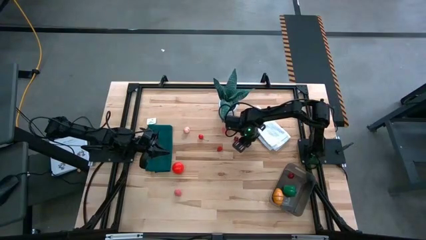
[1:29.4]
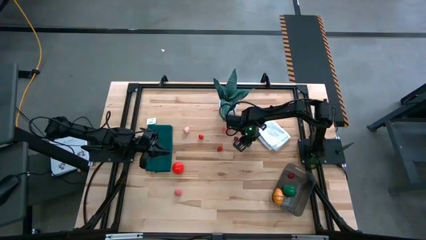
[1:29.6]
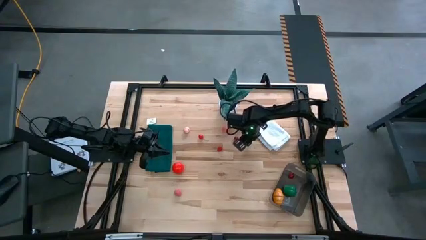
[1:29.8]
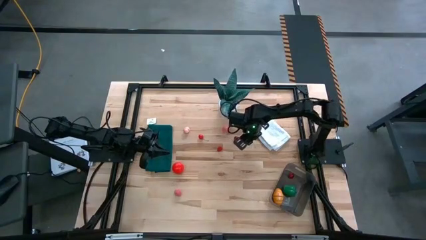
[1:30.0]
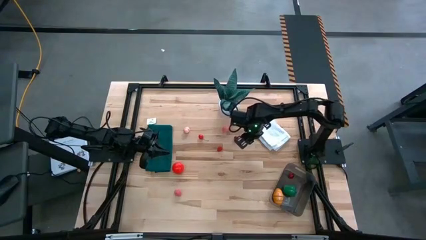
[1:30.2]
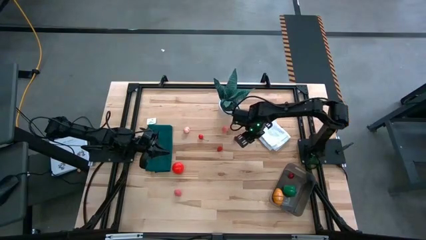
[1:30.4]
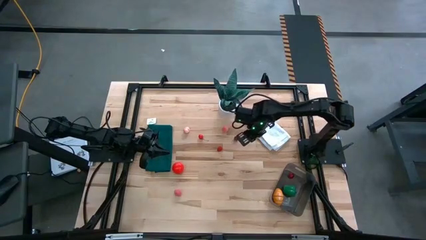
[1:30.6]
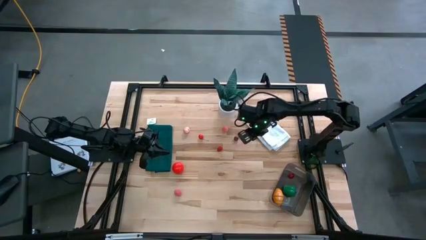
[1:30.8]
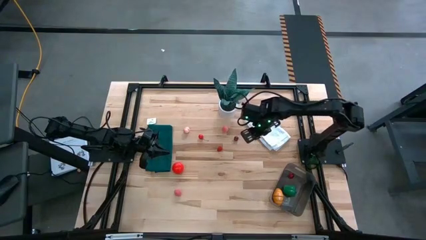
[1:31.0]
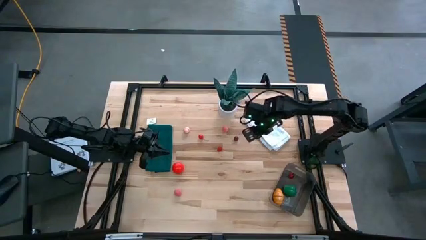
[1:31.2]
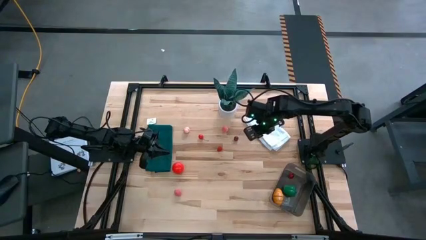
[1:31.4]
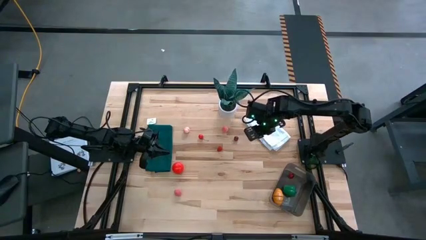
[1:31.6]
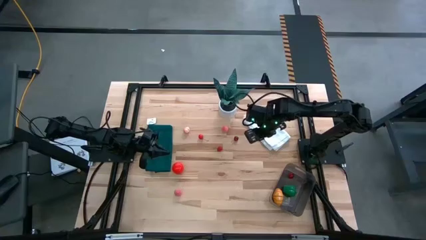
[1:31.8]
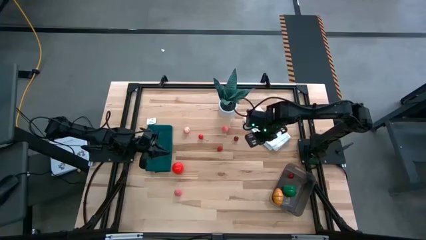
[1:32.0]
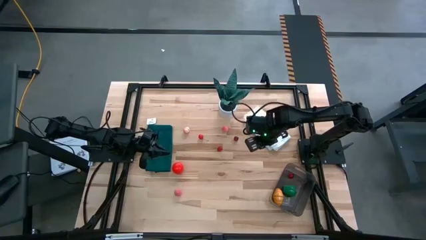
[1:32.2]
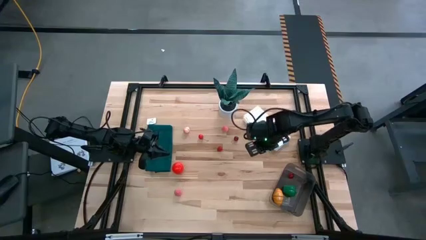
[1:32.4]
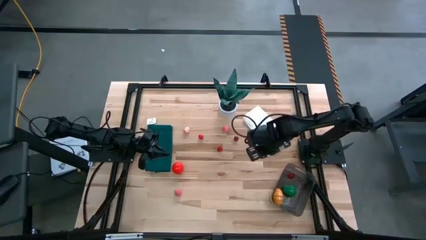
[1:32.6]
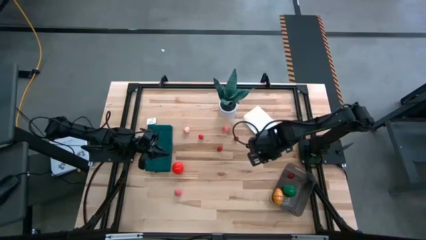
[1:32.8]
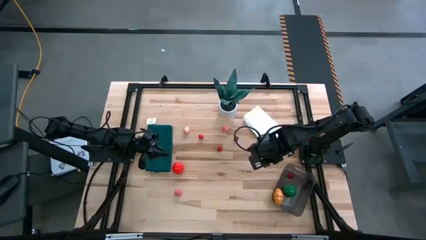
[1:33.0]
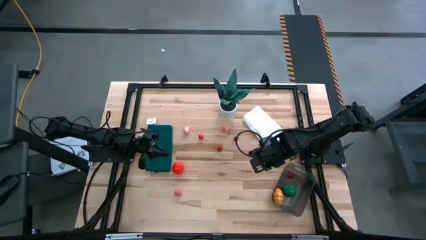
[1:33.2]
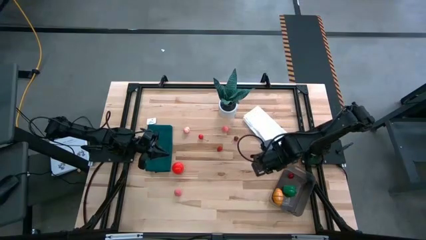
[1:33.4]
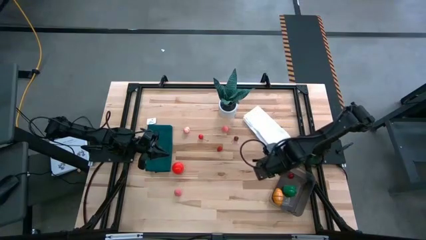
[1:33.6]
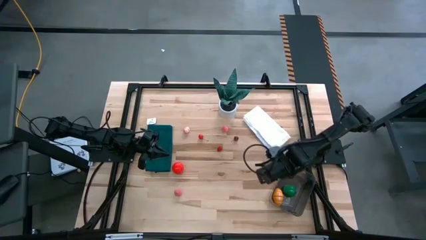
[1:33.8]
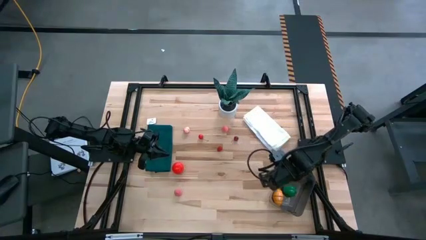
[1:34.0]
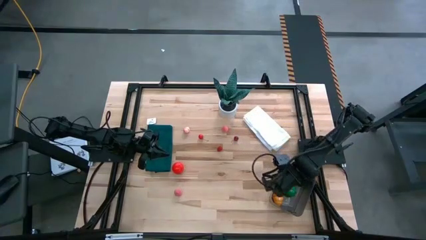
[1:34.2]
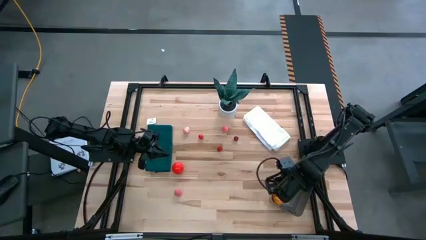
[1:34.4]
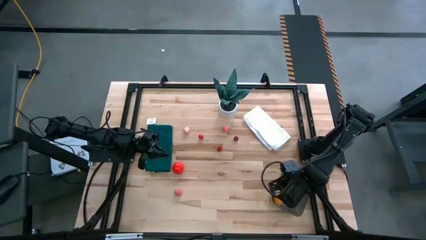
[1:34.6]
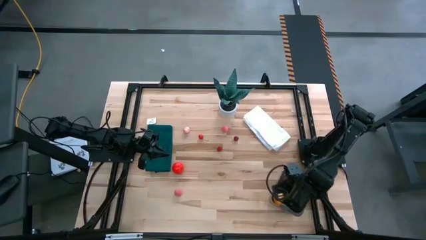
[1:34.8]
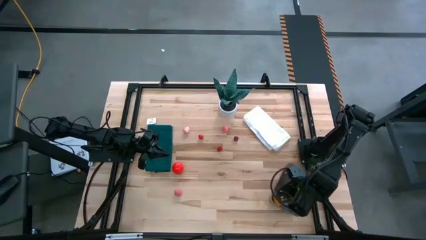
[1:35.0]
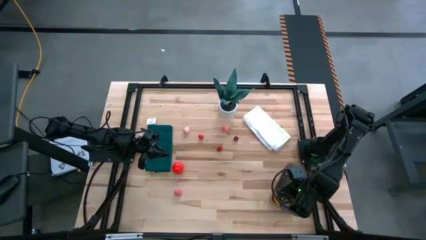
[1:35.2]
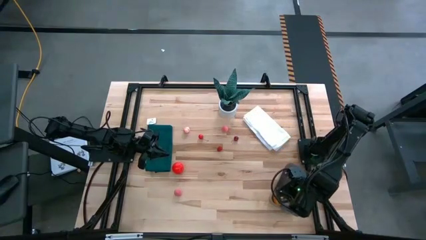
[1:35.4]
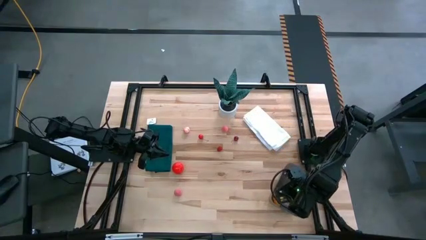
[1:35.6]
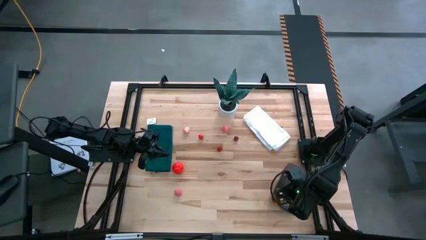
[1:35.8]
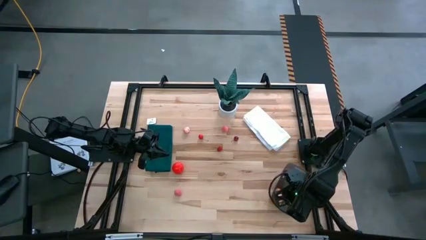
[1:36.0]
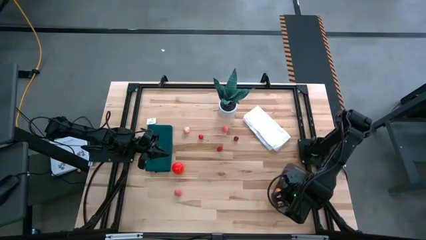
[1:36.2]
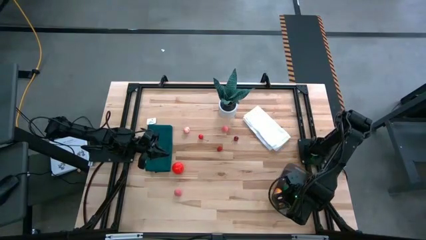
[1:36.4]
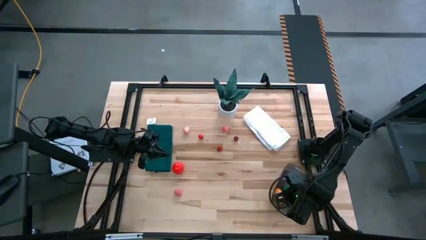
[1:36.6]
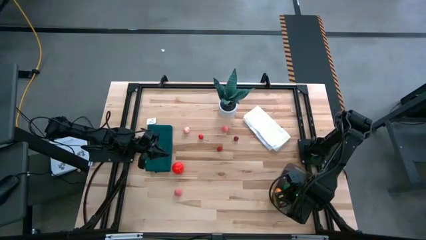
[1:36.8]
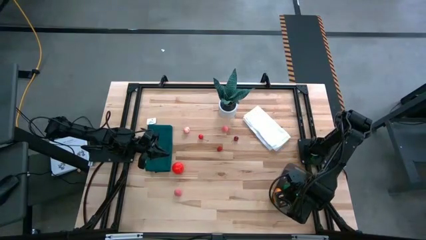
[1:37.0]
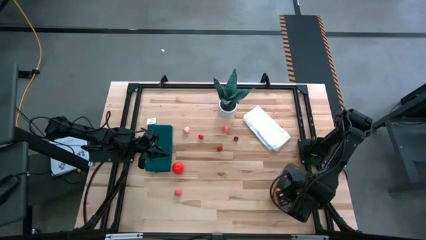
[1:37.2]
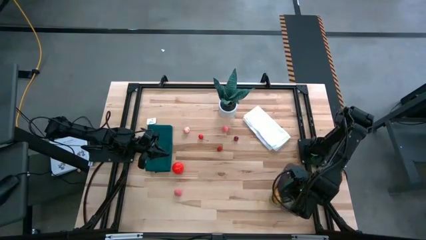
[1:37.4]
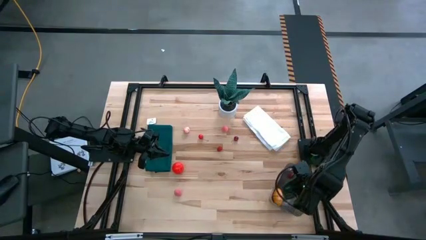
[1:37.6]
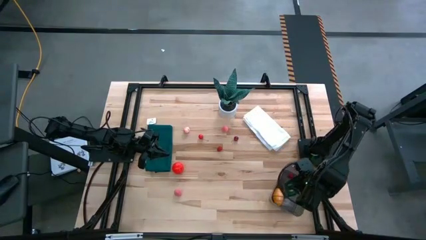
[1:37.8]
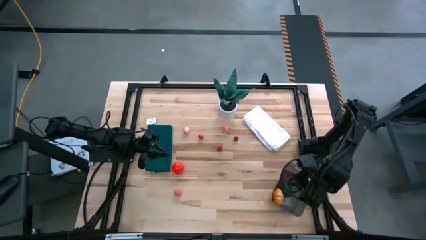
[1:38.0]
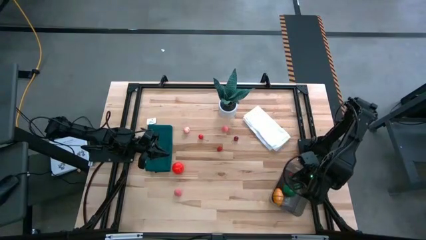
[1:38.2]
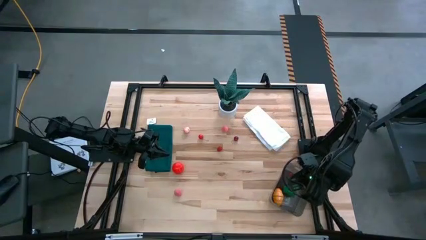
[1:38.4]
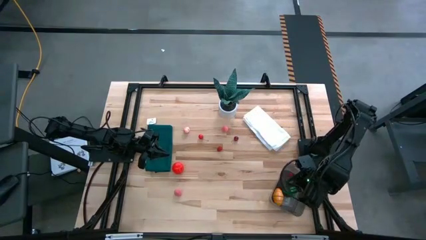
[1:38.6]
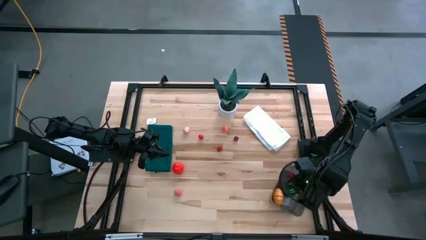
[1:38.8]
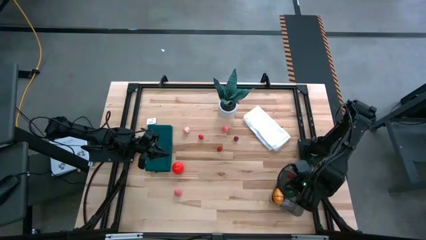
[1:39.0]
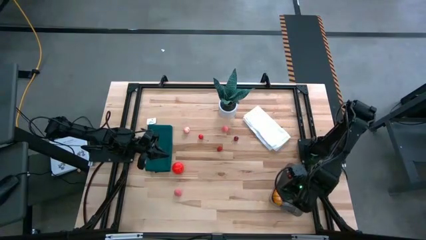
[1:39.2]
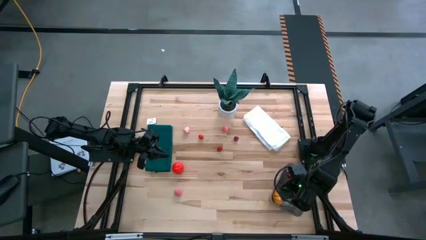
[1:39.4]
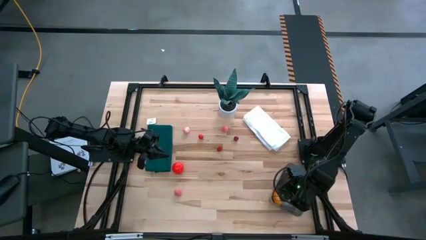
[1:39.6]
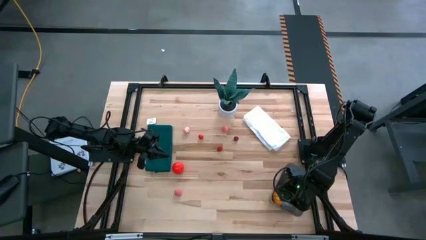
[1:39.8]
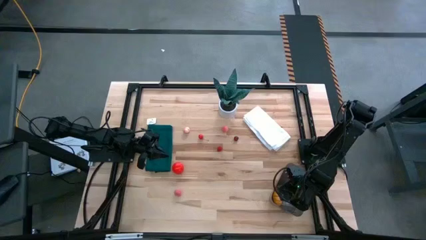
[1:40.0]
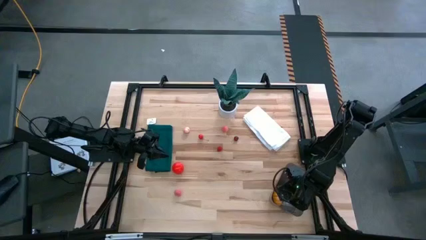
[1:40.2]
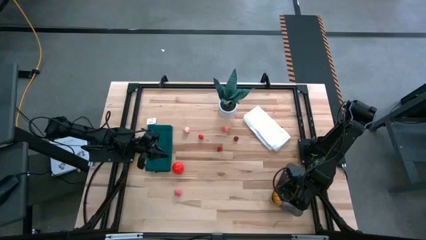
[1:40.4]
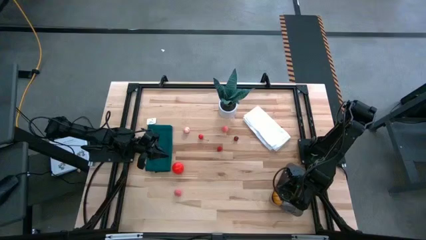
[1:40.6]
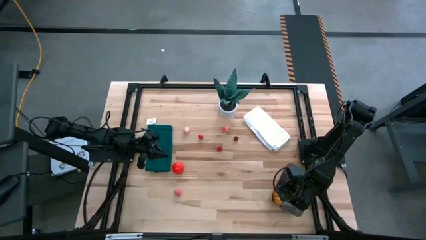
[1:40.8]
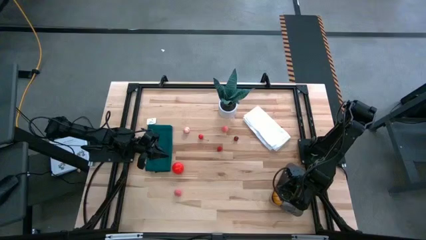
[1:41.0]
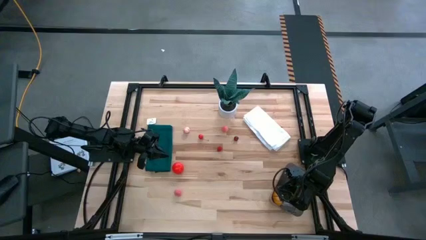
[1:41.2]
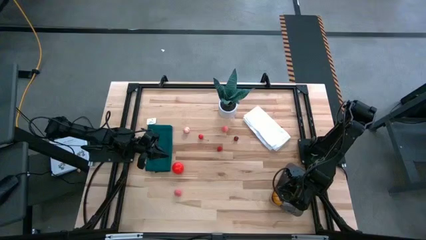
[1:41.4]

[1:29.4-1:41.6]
Task: Pick and placing Produce into tupperware
Put the black cherry into the black bin

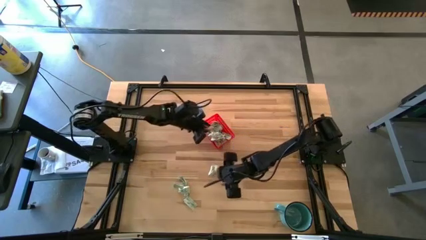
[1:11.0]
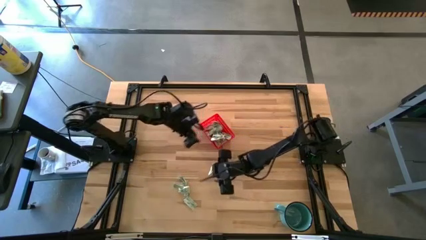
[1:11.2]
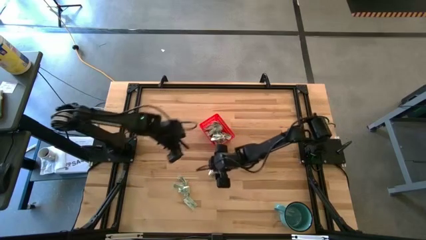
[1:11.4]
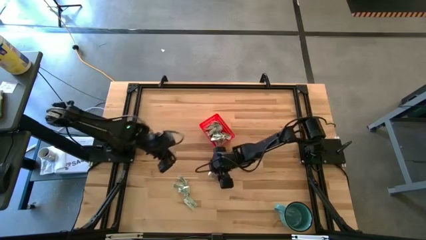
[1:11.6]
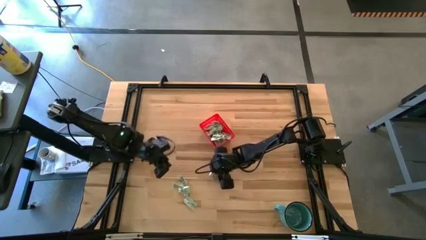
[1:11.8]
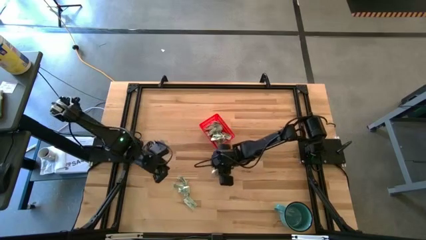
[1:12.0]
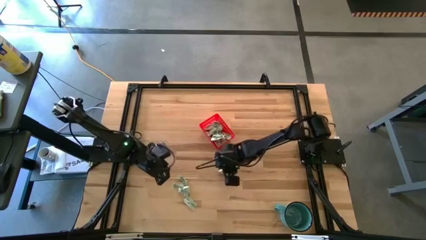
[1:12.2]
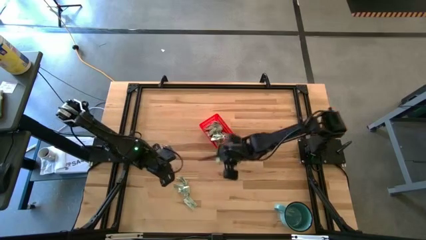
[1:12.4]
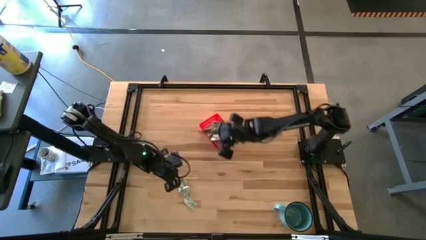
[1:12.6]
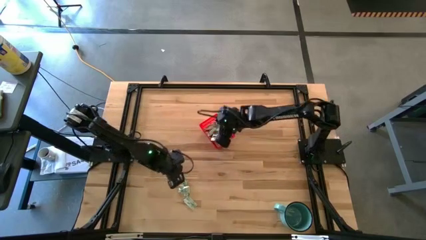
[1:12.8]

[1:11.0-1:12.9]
Task: Pick and place Stevia / Truvia into bins
Put the stevia packet into the red basket

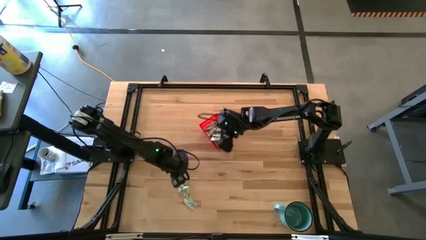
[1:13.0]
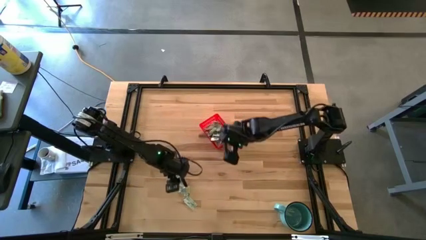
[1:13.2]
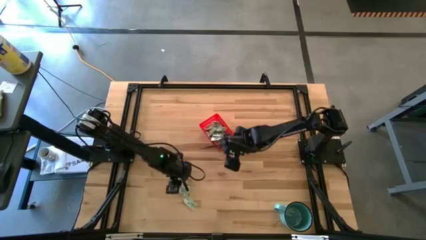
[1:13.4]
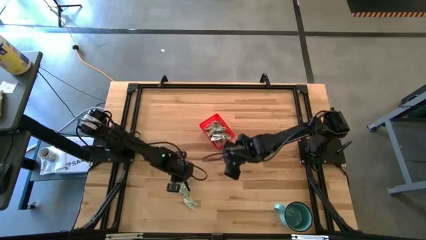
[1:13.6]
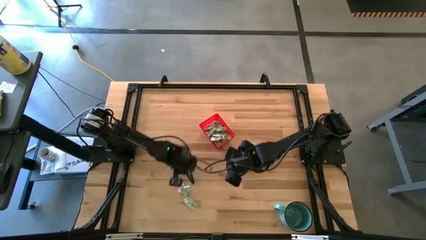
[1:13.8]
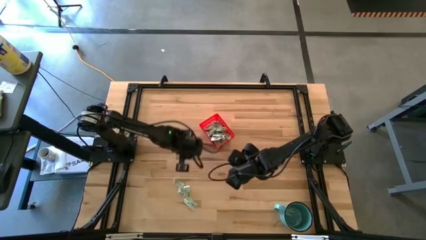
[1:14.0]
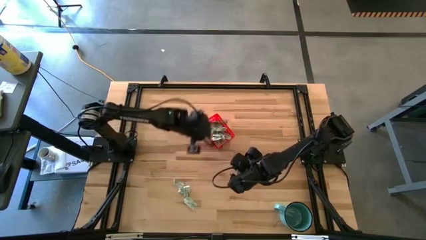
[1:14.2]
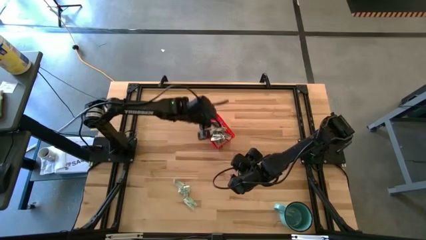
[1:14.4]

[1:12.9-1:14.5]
Put the stevia packet into the red basket
